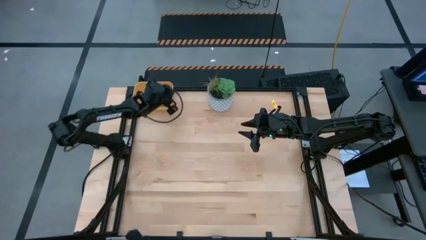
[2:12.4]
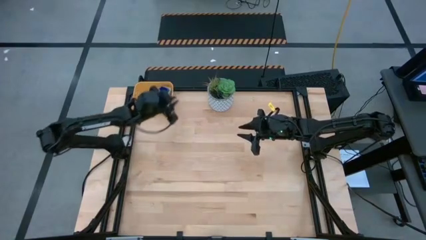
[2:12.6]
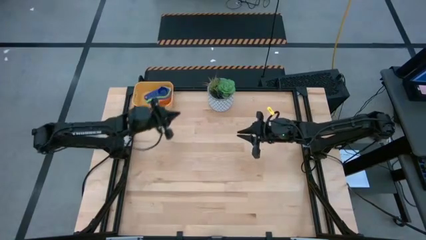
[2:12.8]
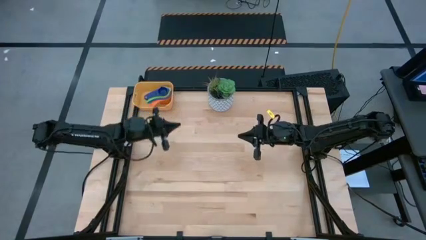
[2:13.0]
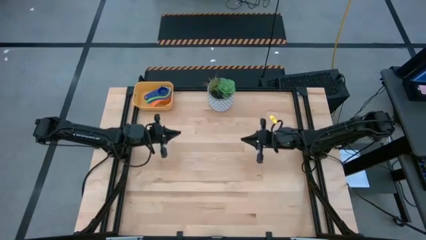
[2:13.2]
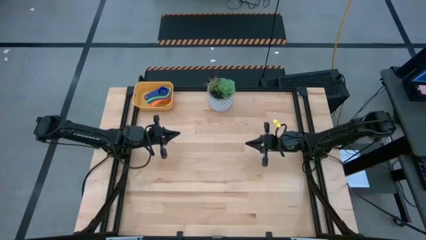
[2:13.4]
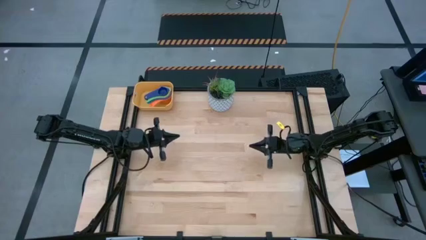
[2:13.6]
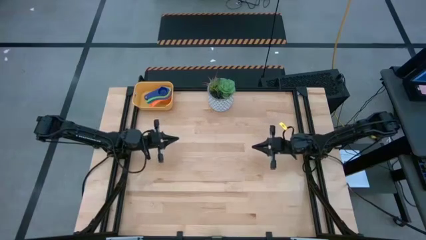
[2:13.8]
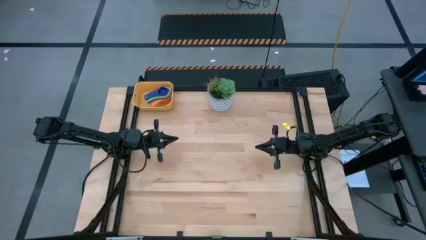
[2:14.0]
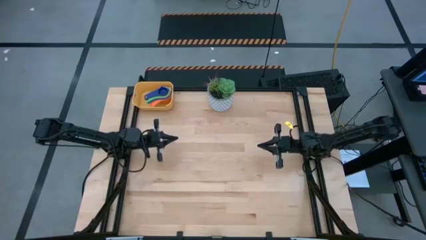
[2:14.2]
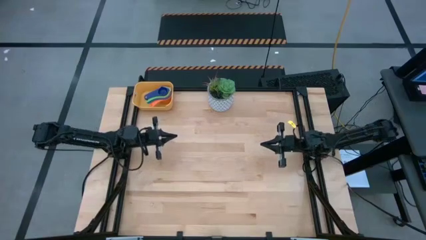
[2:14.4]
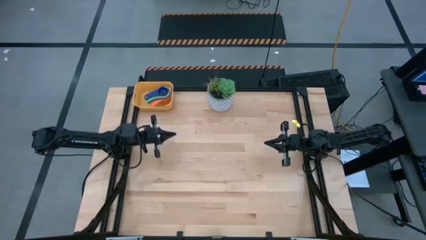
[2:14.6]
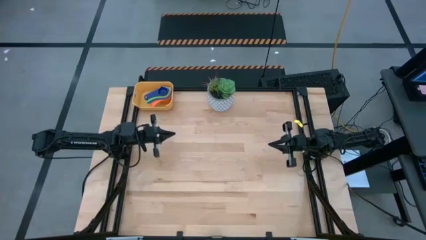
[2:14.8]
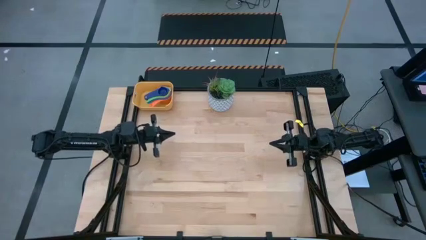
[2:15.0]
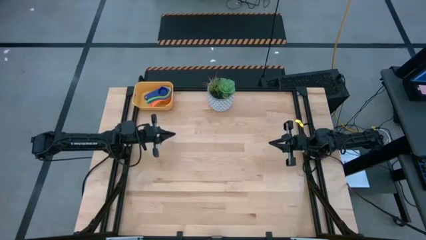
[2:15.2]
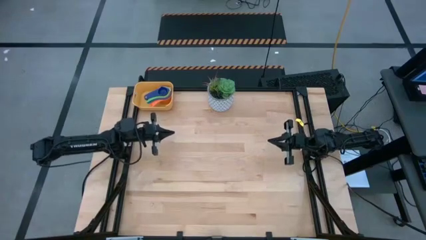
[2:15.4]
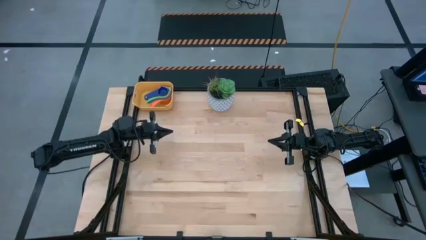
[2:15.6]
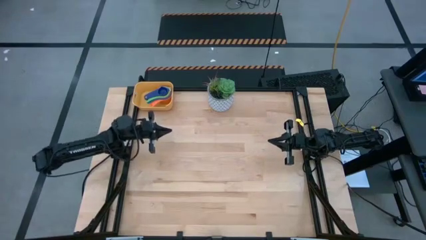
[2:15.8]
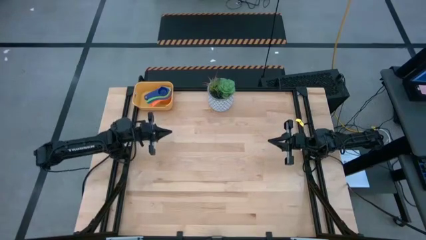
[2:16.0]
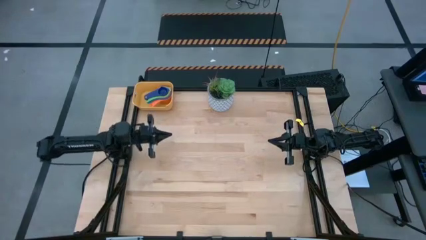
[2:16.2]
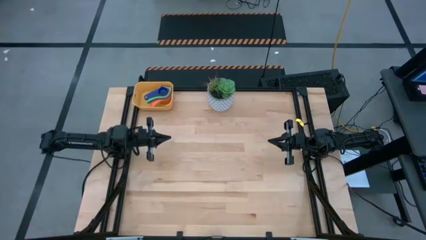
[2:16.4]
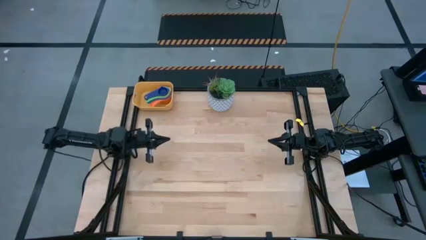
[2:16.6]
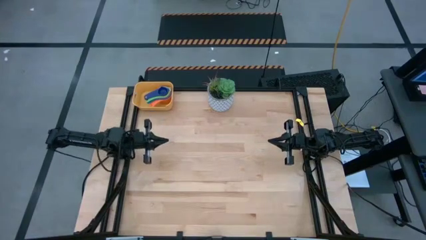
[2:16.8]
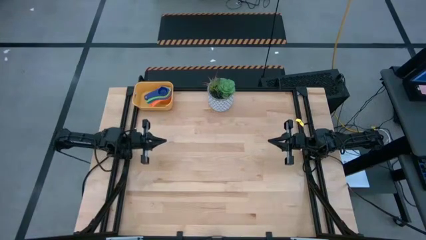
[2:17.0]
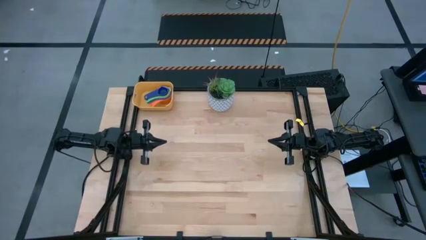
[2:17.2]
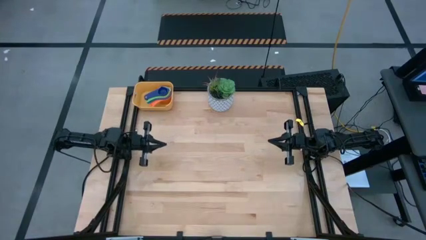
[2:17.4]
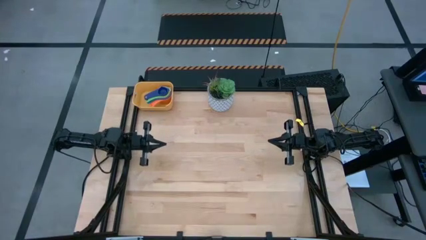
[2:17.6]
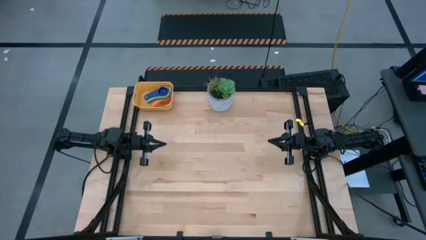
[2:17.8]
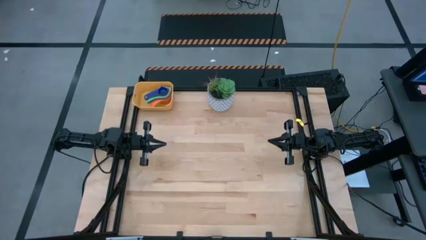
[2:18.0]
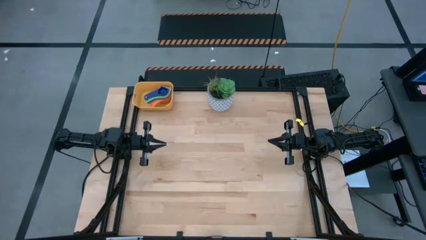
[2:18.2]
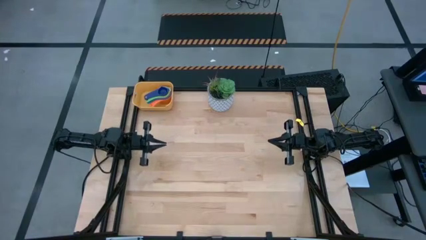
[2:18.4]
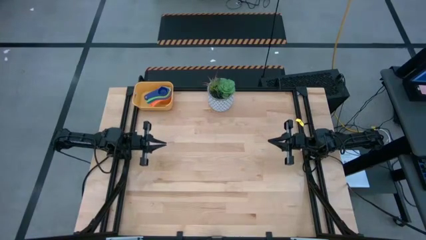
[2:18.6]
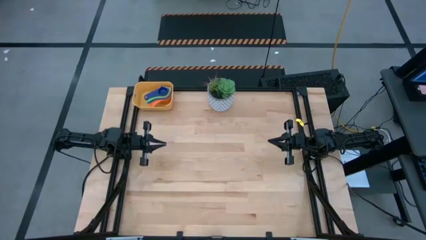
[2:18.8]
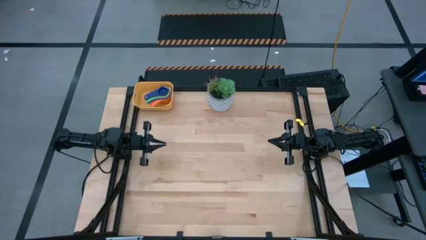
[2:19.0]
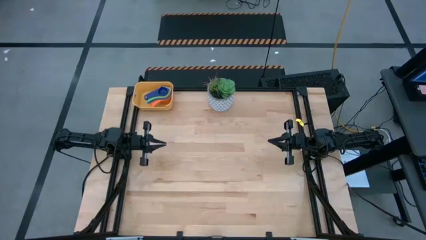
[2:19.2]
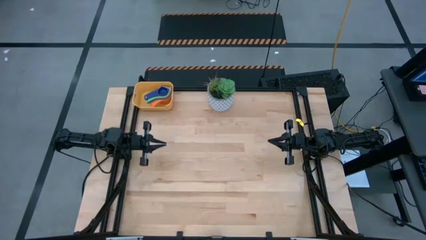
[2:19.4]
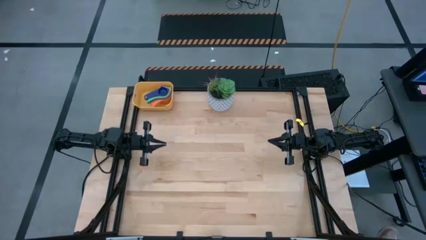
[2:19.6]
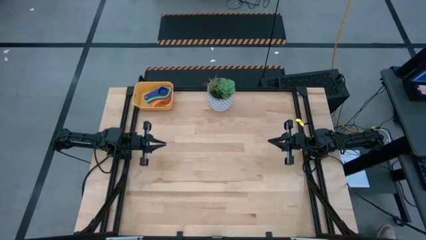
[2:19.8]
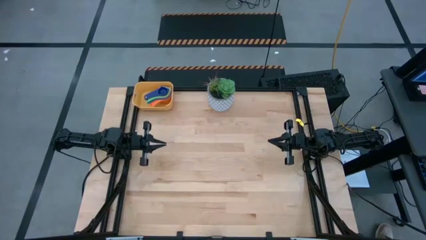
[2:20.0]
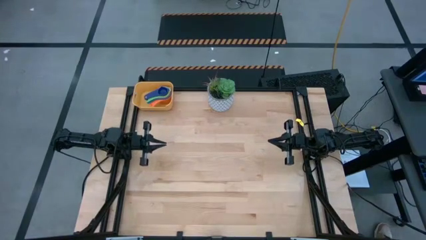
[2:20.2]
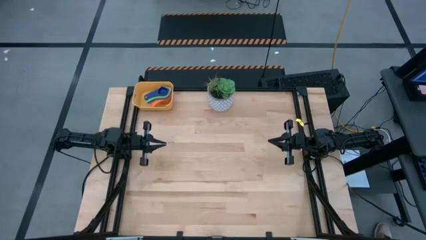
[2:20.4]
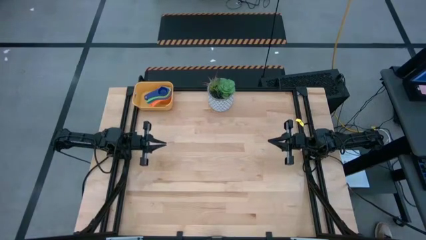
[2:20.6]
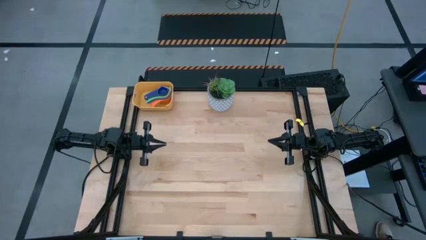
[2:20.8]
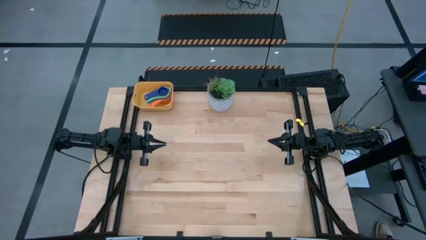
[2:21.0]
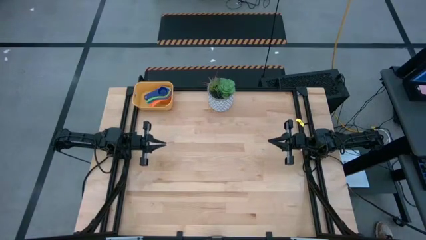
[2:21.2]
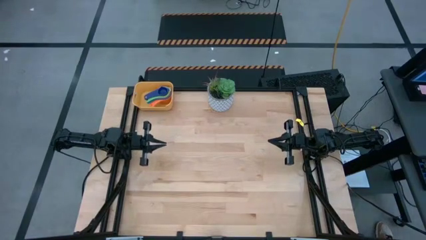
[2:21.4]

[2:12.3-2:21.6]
Task: Nest measuring cups in basket
Return to Home Position
